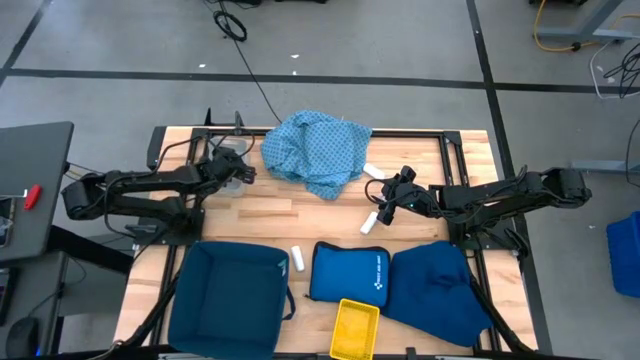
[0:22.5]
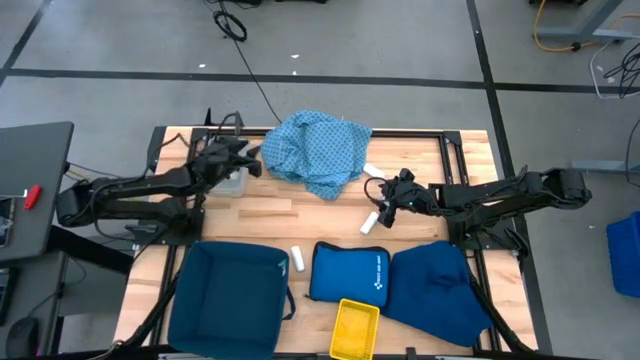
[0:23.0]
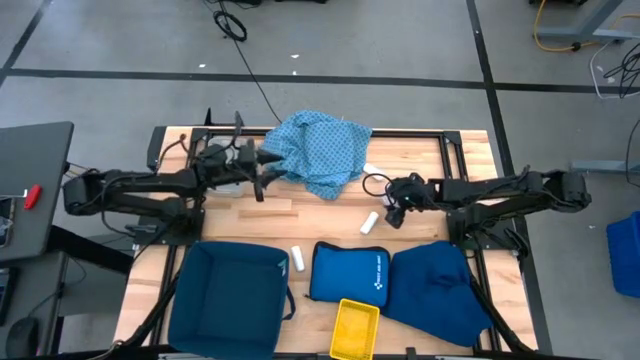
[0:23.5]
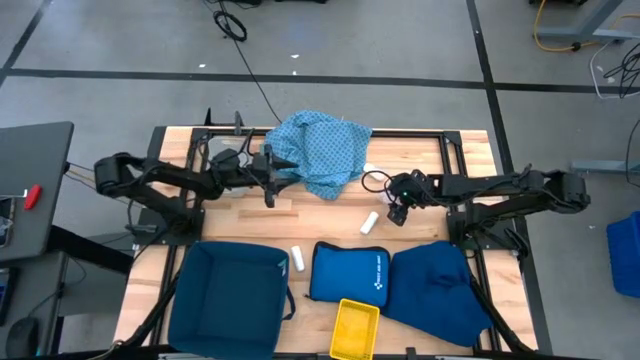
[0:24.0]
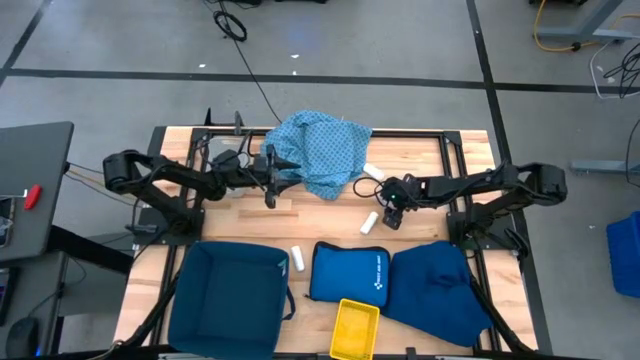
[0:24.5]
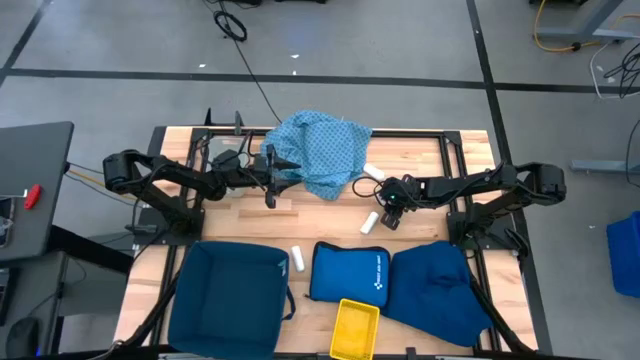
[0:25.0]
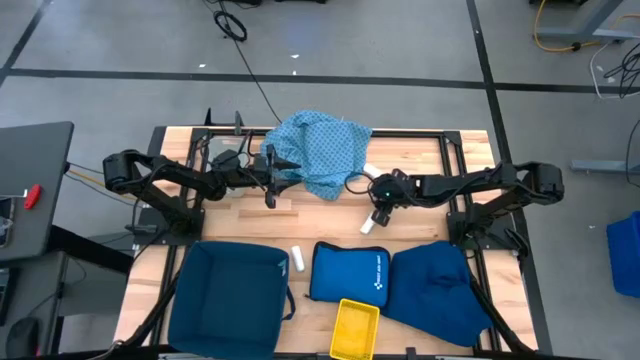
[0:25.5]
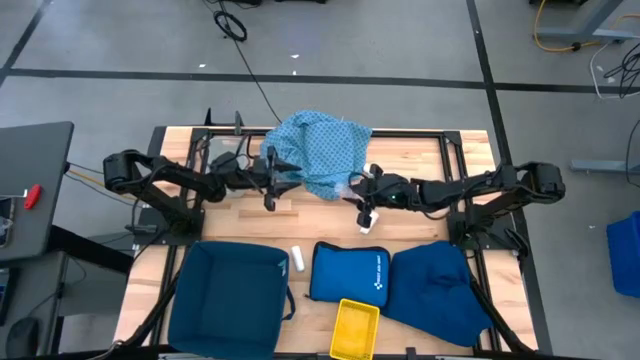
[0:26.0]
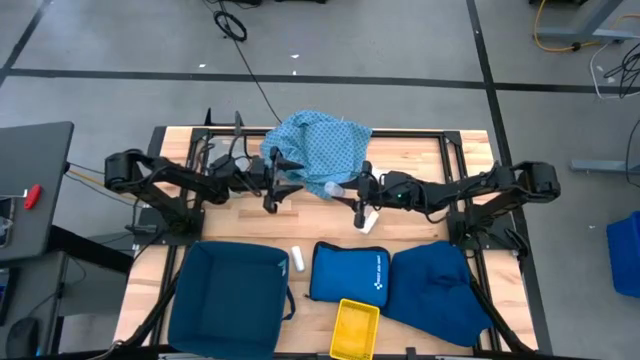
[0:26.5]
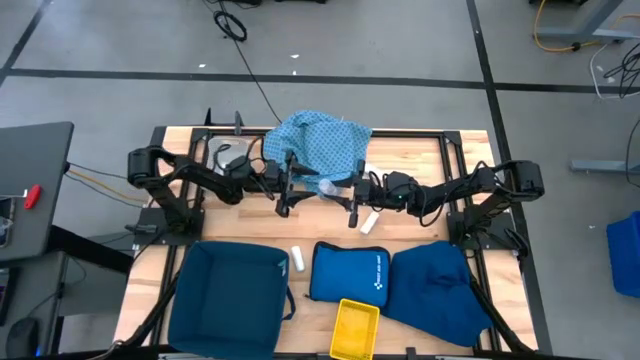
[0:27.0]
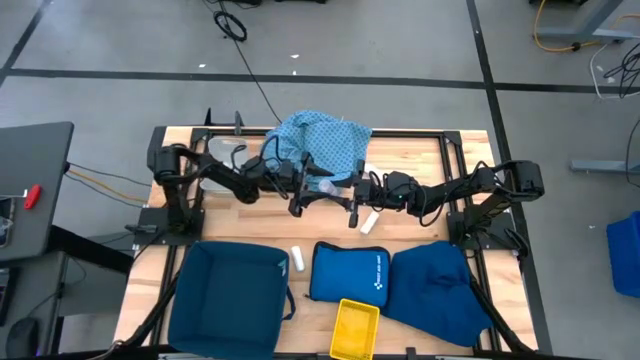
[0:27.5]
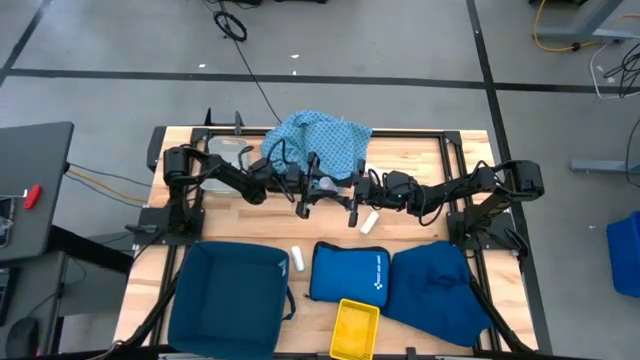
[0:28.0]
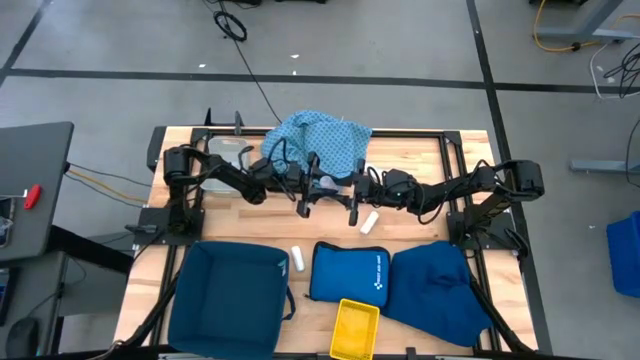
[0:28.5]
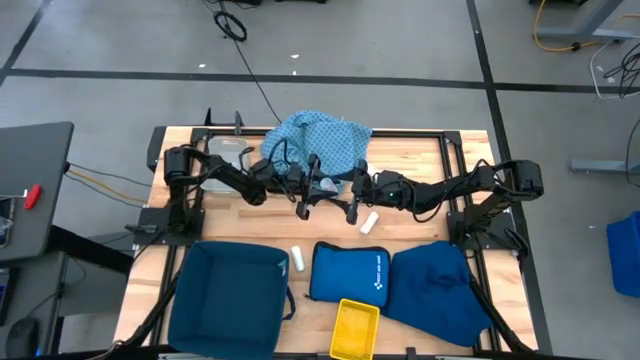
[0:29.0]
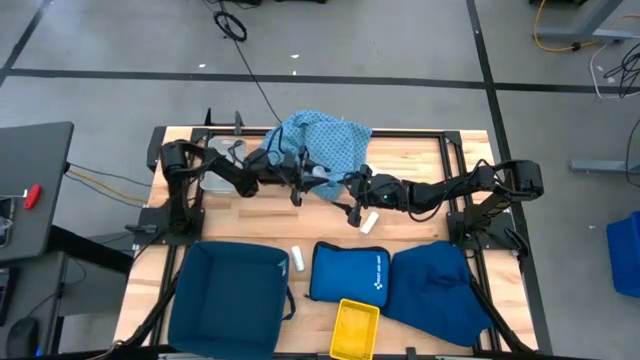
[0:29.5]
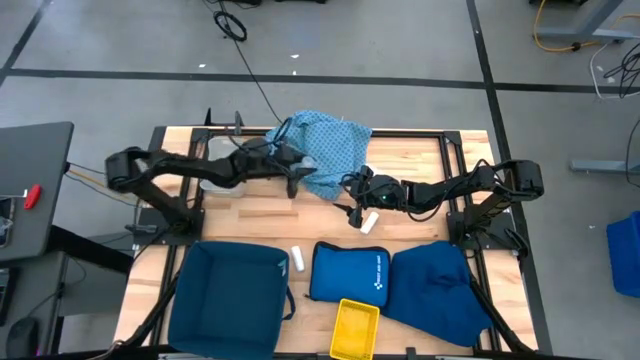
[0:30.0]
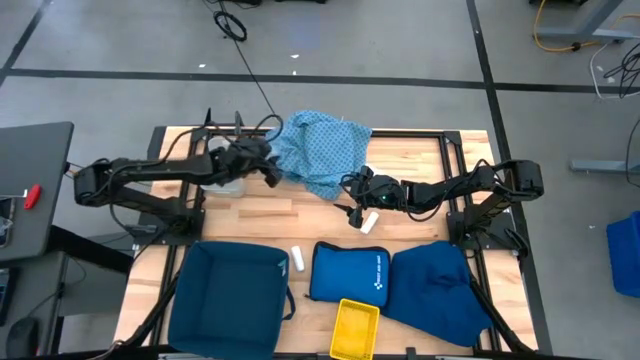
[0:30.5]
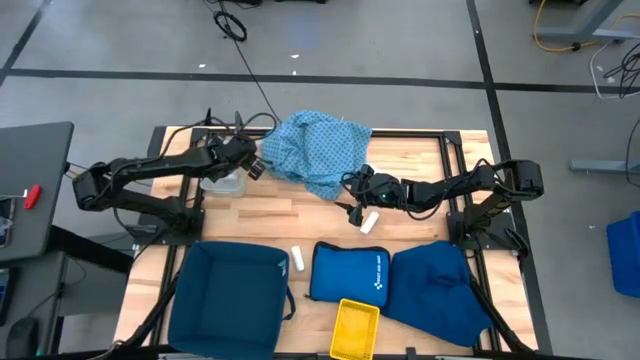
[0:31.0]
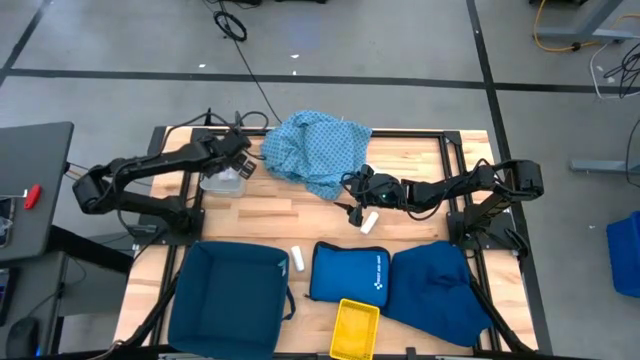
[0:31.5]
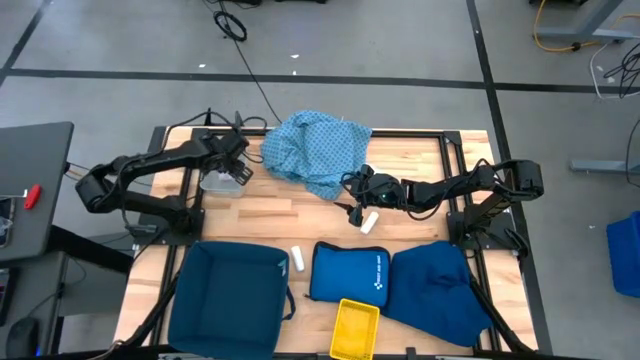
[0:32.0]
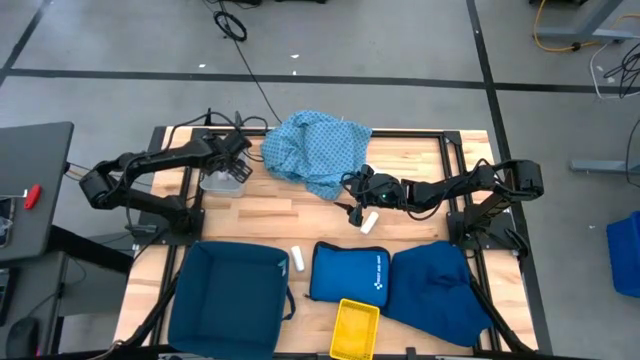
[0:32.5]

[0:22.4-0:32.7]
Task: Pick & place medical supplies in basket/bin
Put the transparent pill bottle into the gray bin

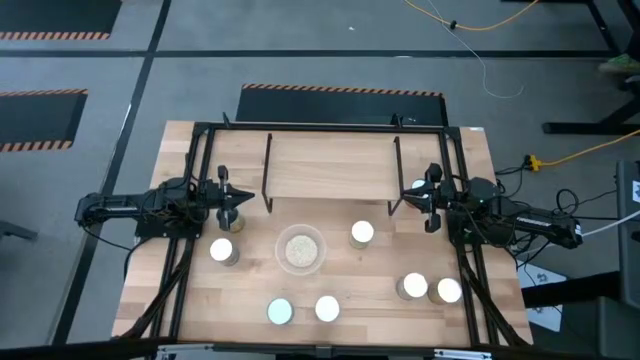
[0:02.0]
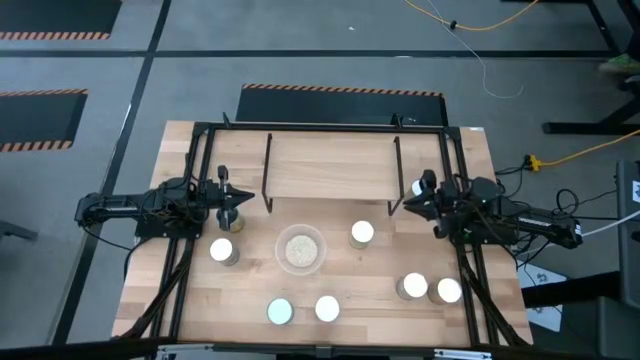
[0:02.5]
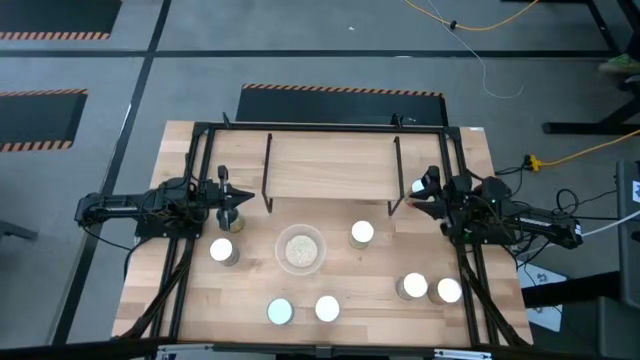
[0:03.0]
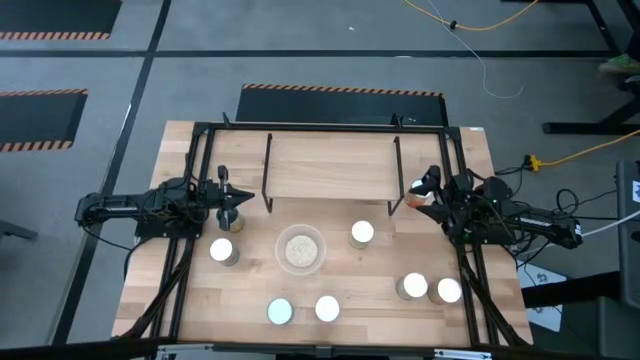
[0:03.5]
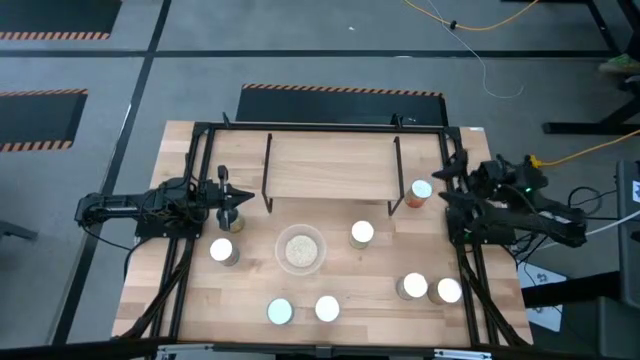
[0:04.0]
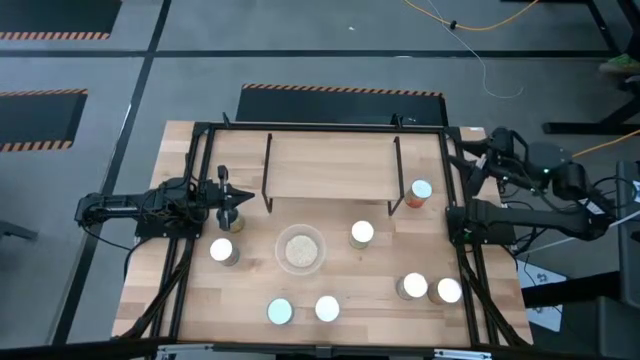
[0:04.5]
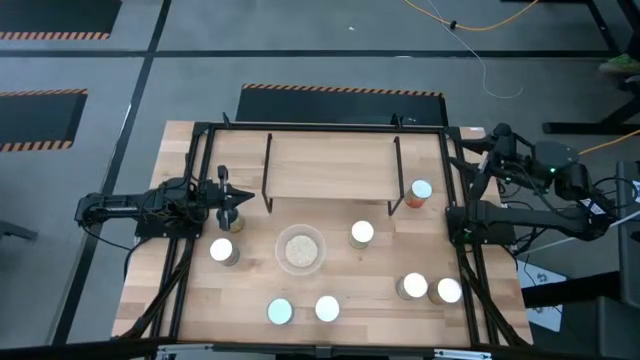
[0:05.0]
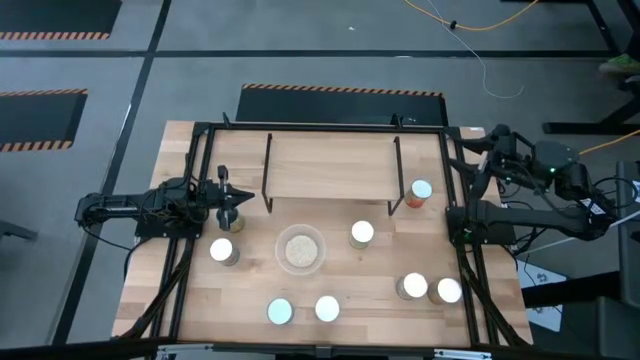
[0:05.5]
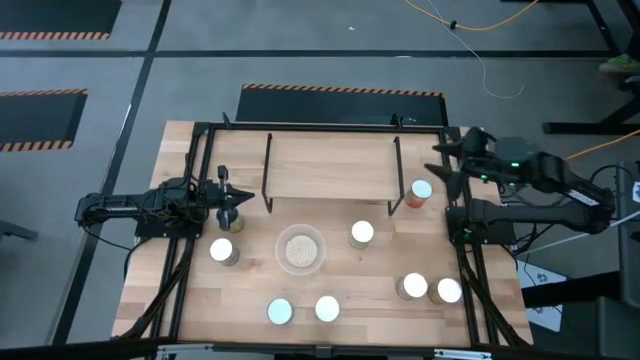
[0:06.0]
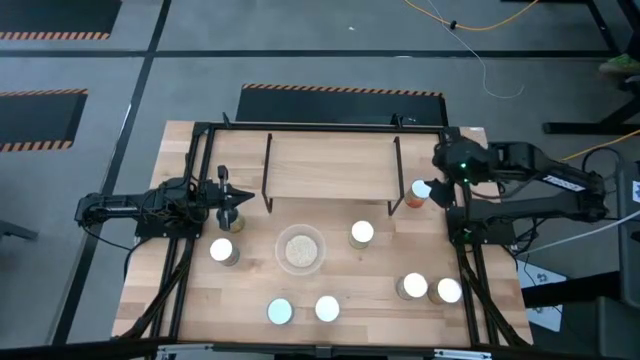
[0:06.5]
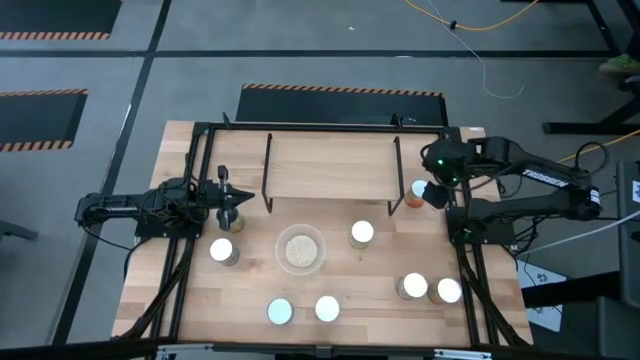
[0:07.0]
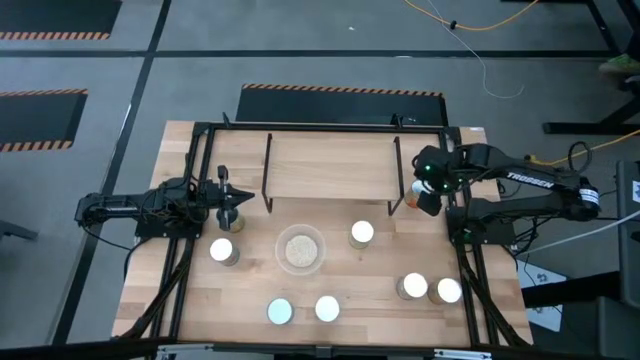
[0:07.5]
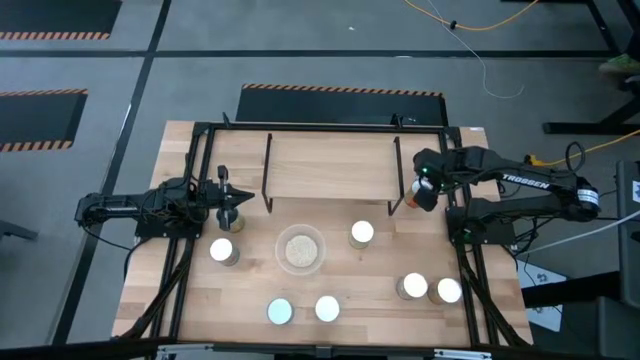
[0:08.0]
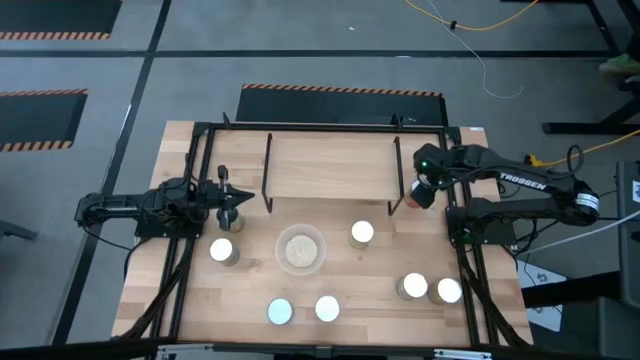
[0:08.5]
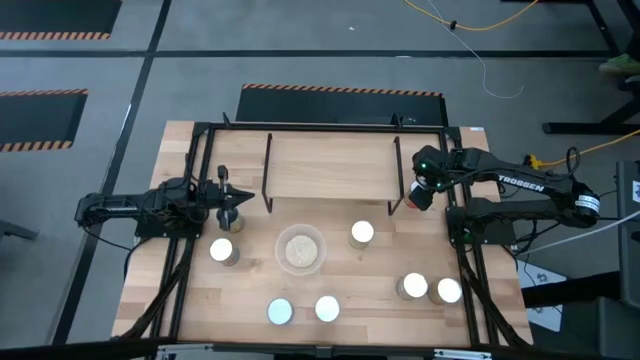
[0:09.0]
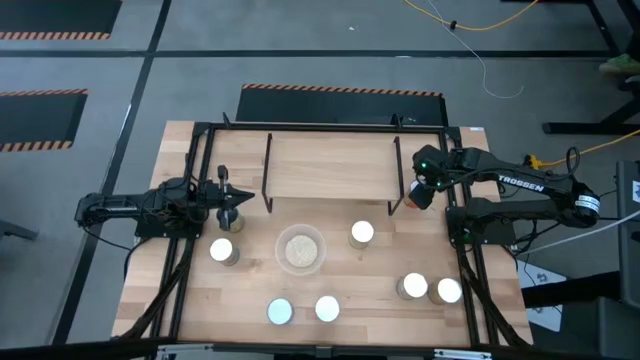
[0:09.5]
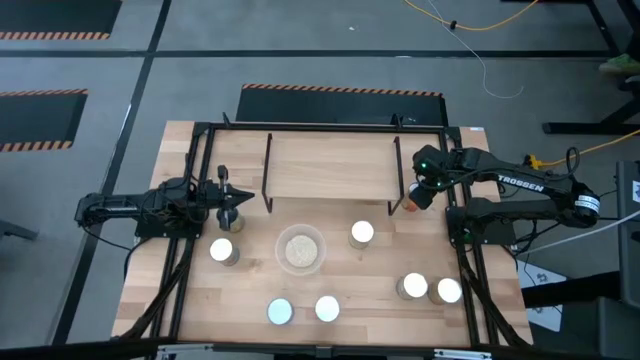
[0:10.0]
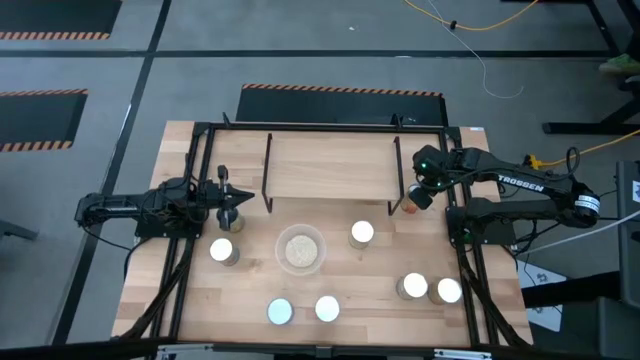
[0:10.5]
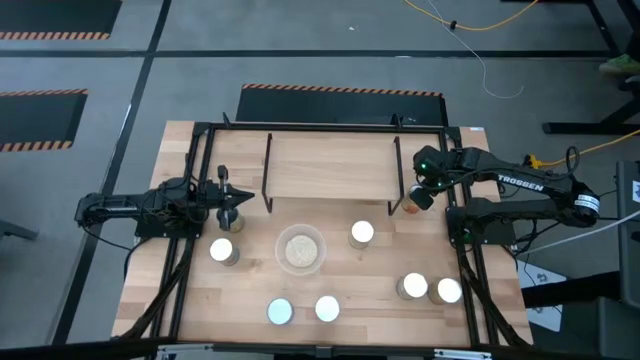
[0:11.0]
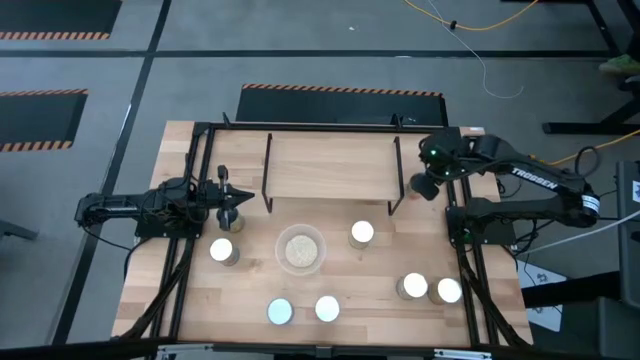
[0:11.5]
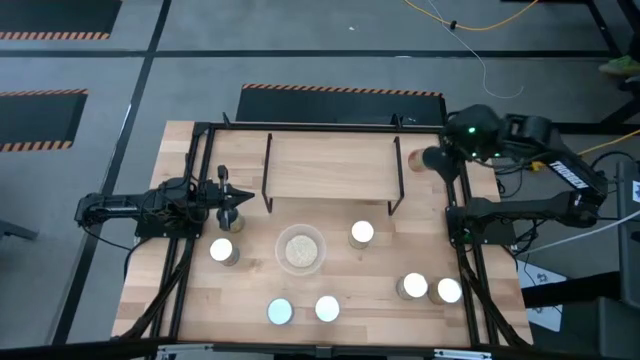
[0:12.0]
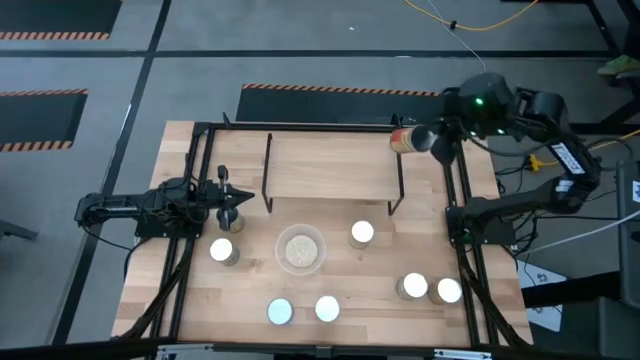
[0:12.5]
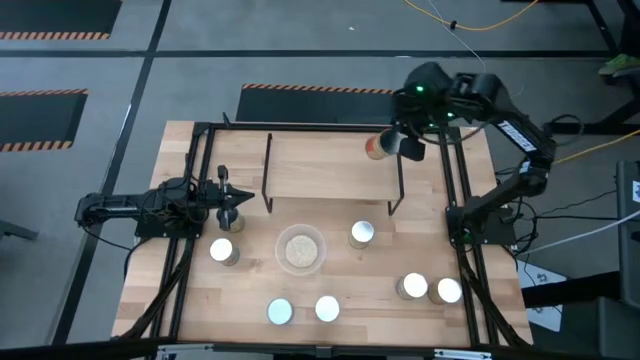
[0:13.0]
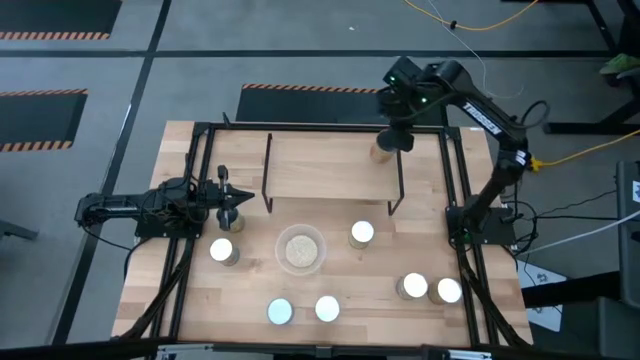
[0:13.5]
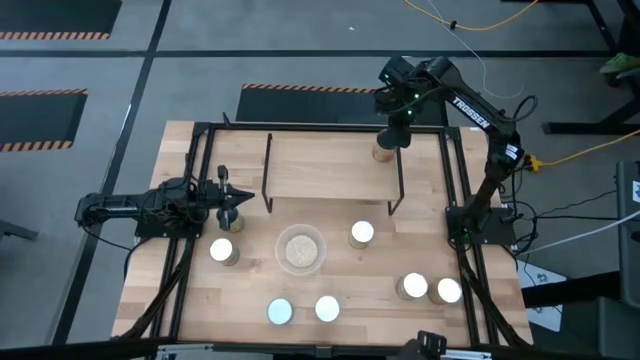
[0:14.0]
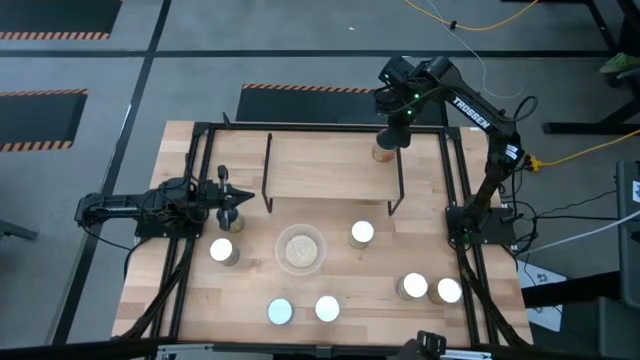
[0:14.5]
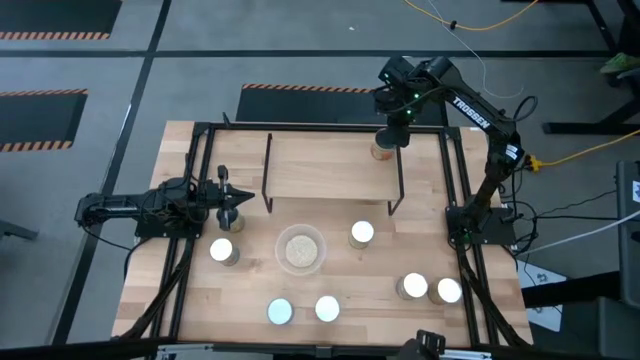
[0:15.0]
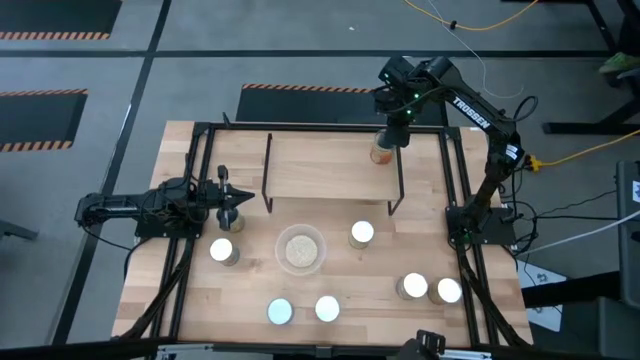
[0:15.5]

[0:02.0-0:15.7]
Task: Pick and place cans onto a shelf
Put the canned pineapple on the shelf
